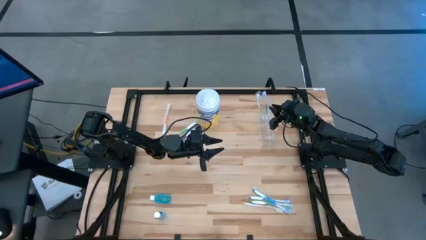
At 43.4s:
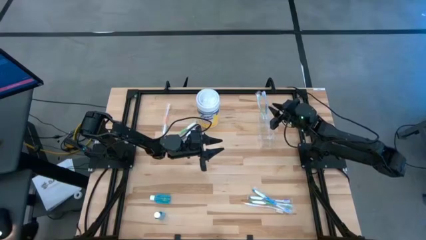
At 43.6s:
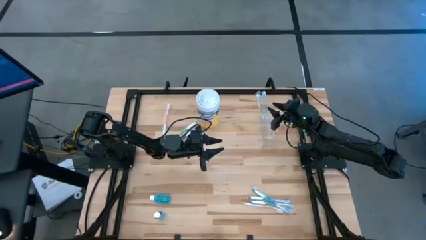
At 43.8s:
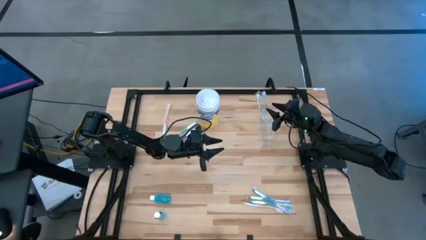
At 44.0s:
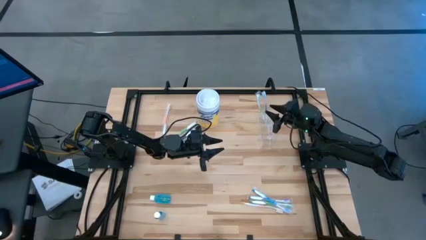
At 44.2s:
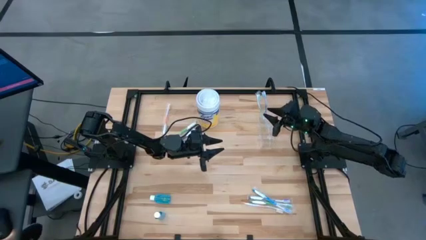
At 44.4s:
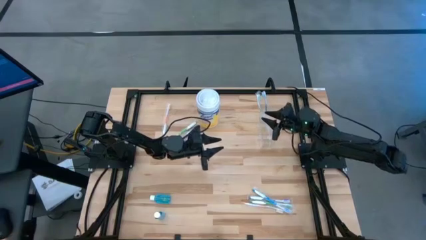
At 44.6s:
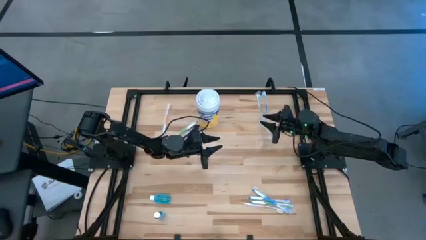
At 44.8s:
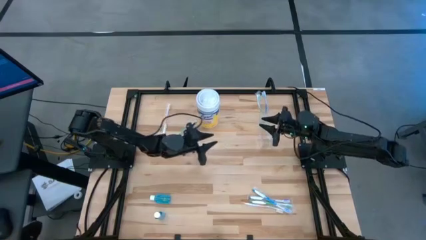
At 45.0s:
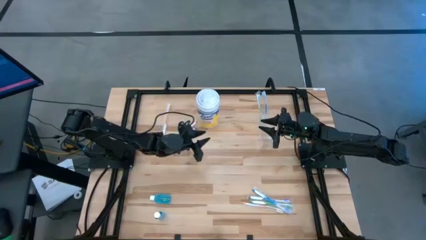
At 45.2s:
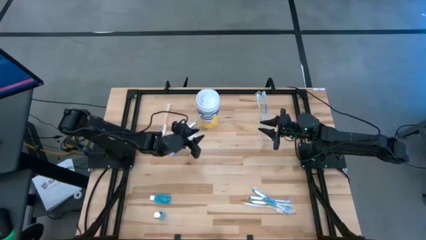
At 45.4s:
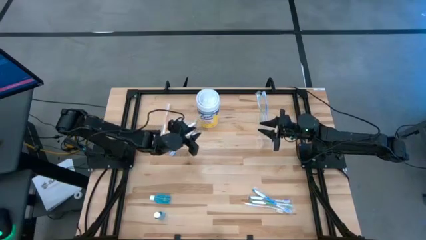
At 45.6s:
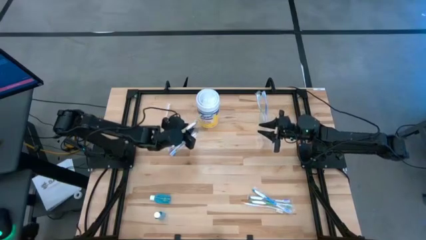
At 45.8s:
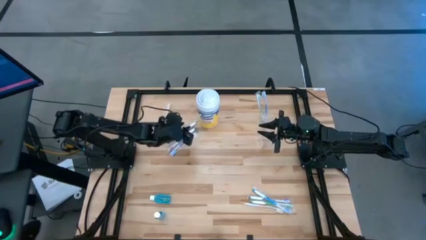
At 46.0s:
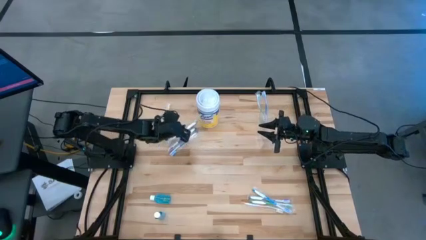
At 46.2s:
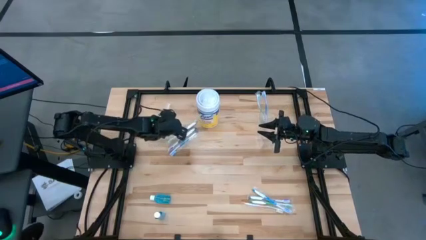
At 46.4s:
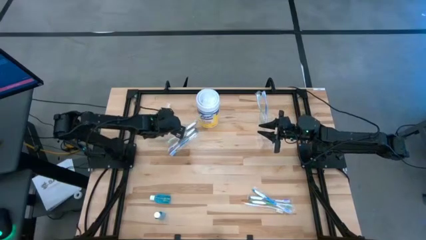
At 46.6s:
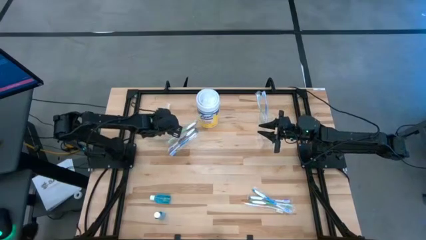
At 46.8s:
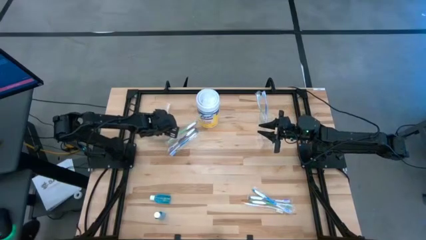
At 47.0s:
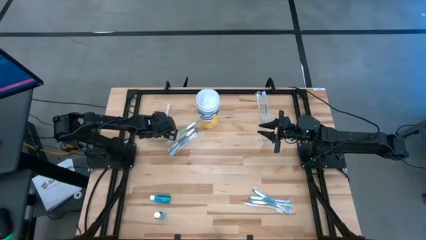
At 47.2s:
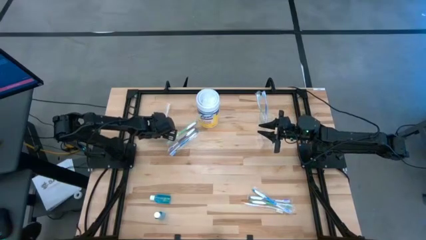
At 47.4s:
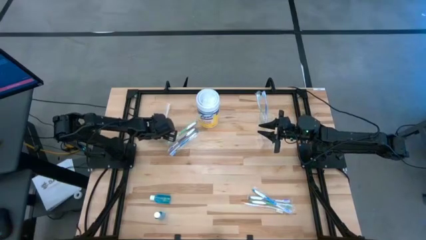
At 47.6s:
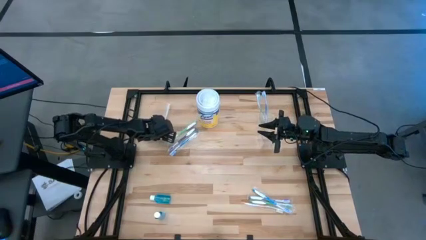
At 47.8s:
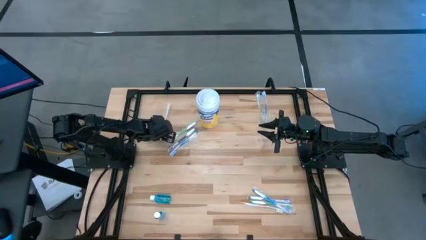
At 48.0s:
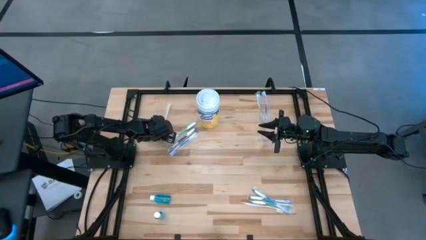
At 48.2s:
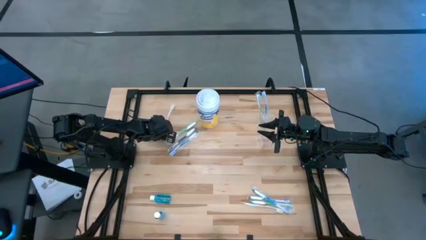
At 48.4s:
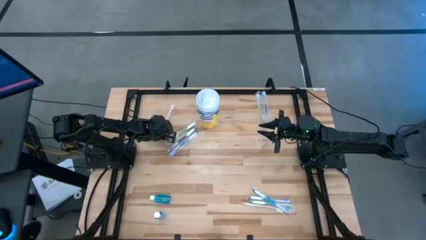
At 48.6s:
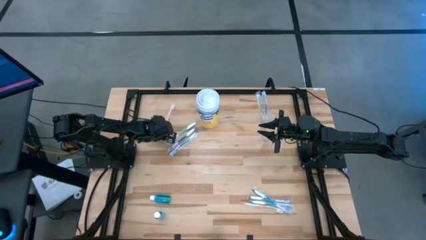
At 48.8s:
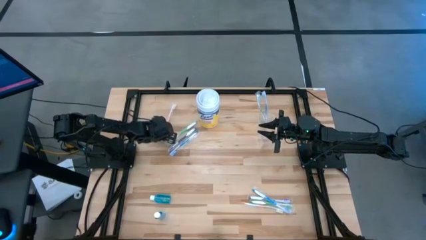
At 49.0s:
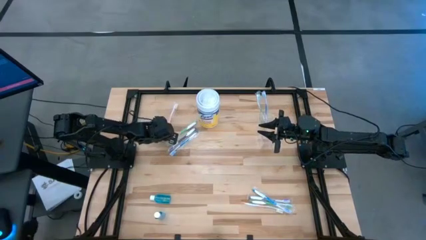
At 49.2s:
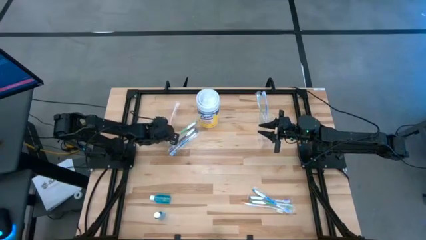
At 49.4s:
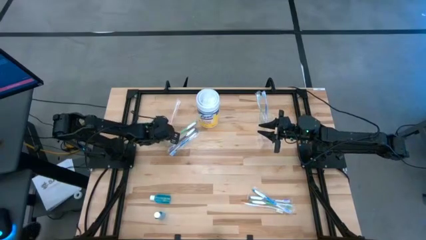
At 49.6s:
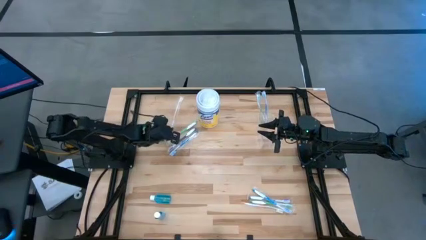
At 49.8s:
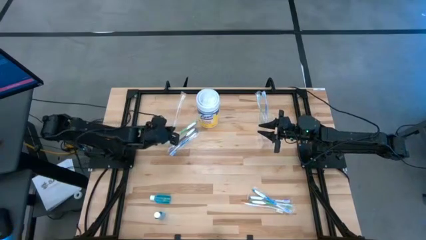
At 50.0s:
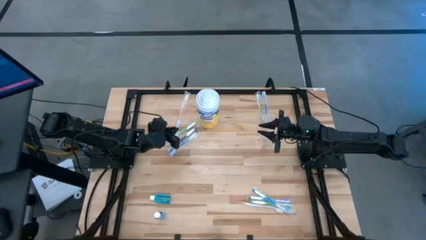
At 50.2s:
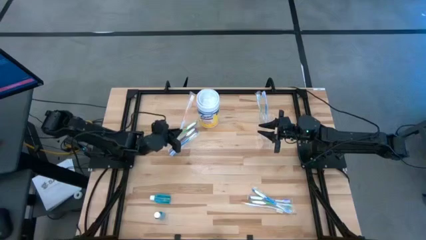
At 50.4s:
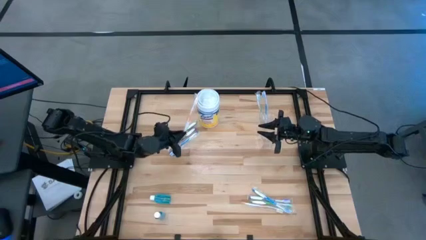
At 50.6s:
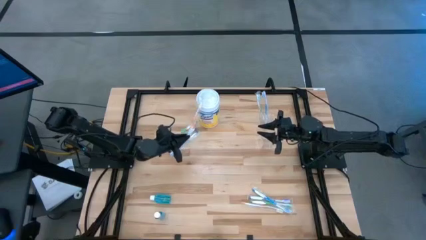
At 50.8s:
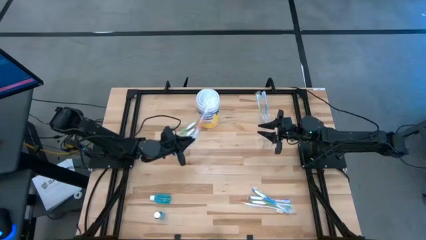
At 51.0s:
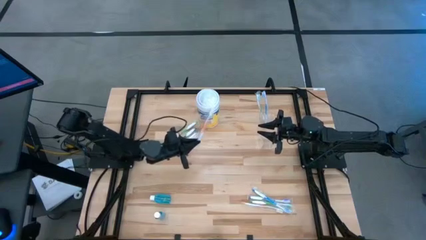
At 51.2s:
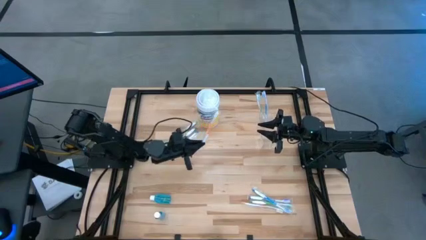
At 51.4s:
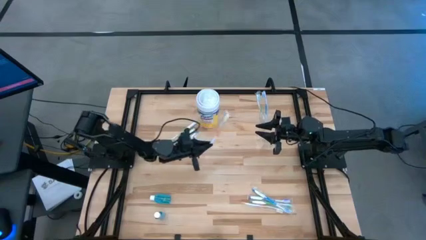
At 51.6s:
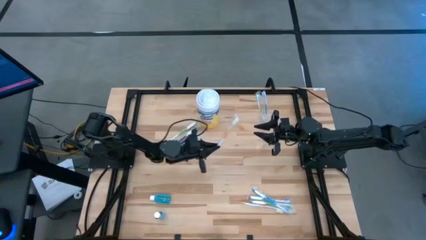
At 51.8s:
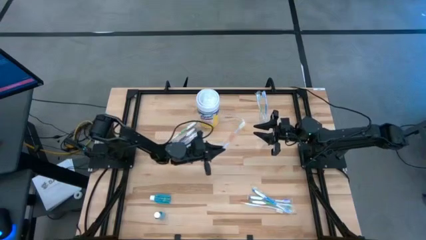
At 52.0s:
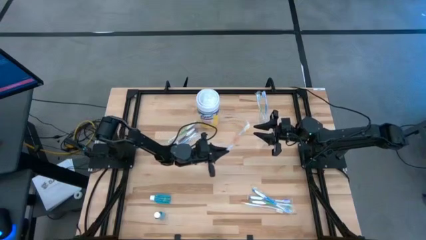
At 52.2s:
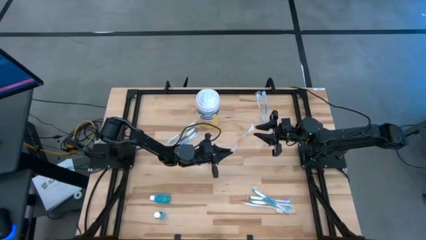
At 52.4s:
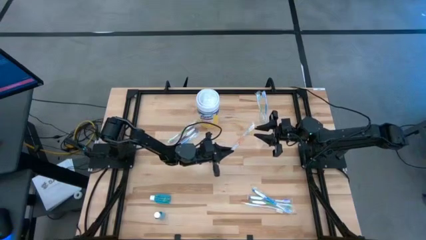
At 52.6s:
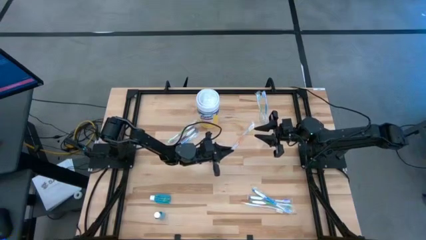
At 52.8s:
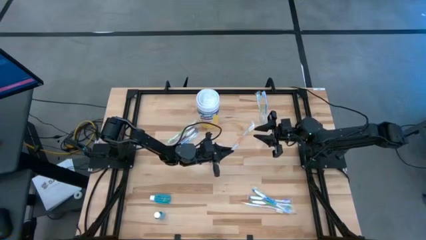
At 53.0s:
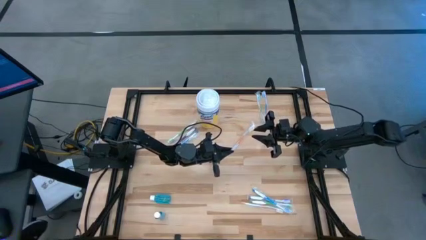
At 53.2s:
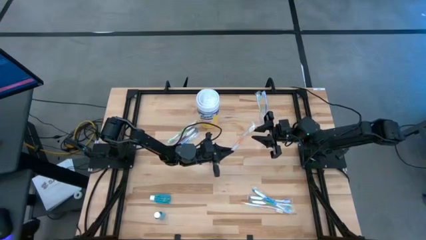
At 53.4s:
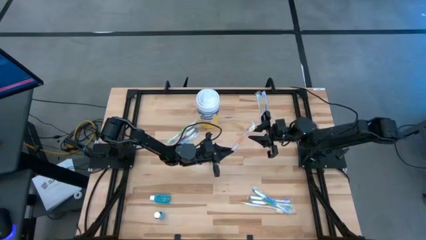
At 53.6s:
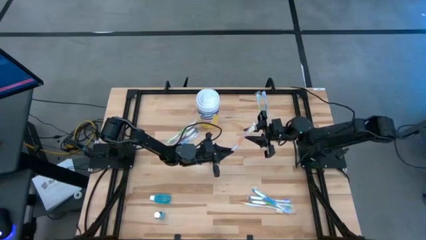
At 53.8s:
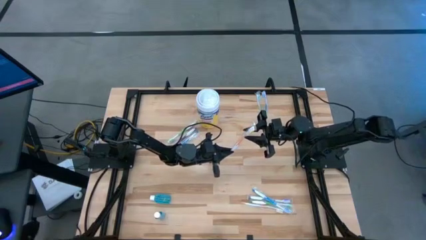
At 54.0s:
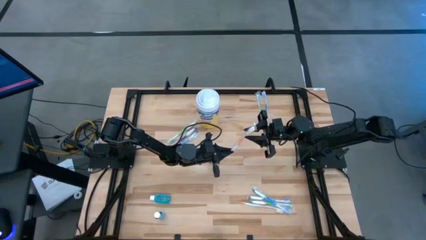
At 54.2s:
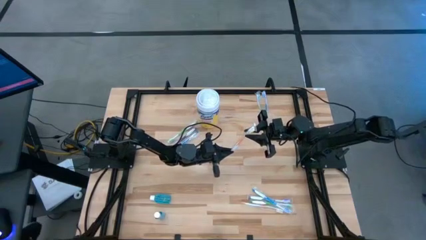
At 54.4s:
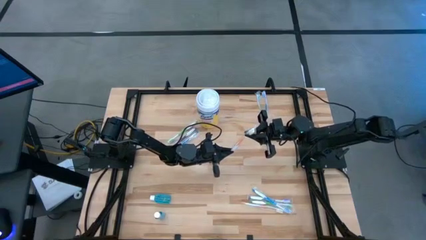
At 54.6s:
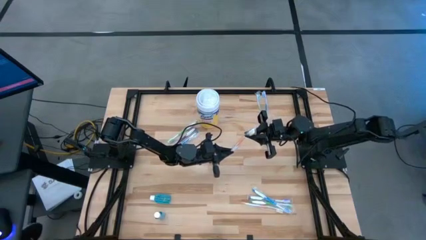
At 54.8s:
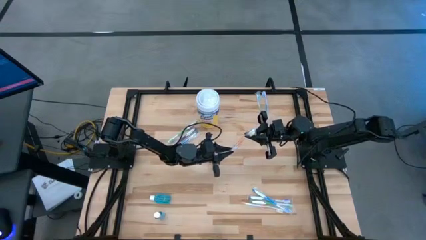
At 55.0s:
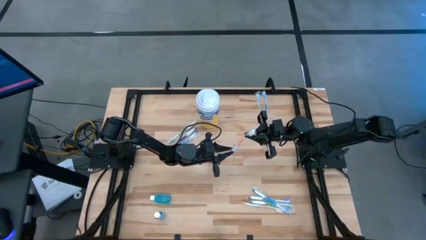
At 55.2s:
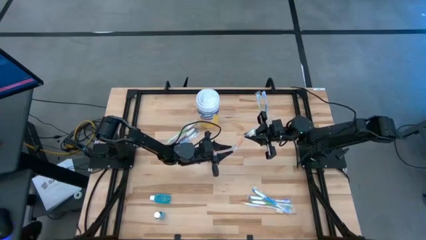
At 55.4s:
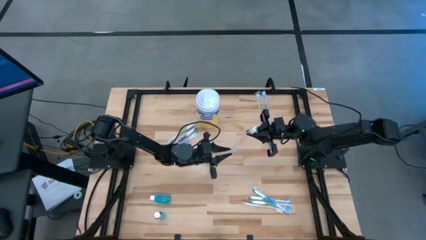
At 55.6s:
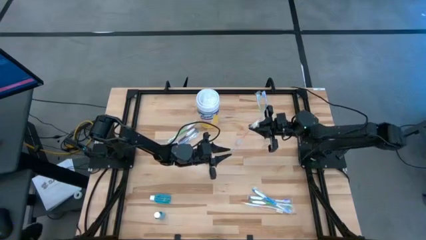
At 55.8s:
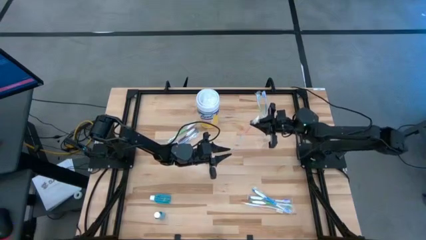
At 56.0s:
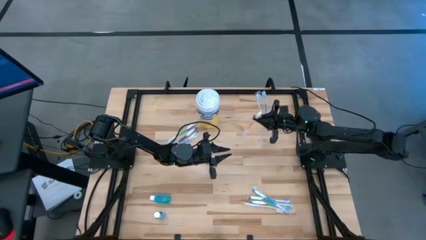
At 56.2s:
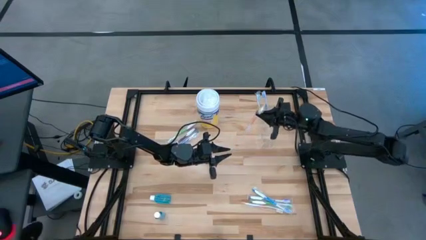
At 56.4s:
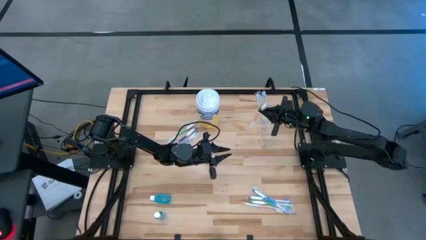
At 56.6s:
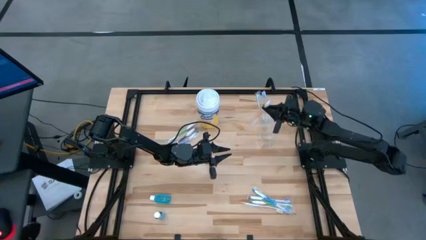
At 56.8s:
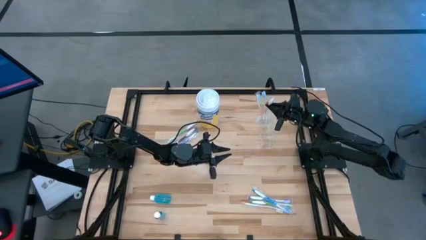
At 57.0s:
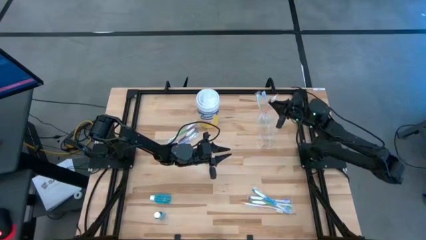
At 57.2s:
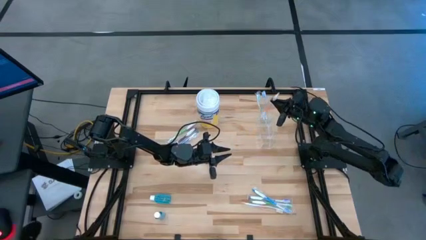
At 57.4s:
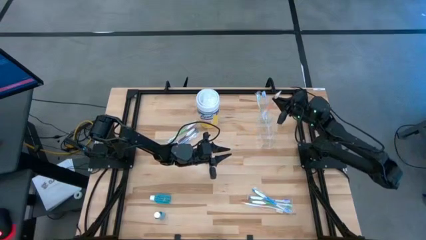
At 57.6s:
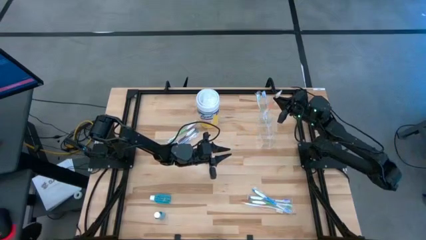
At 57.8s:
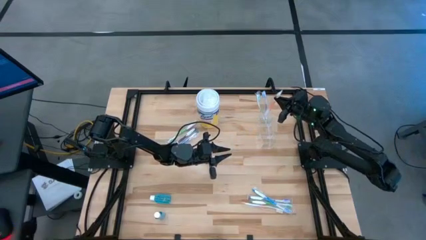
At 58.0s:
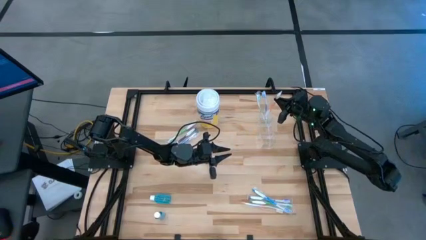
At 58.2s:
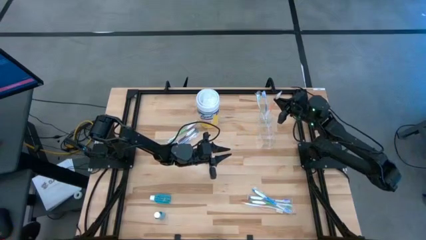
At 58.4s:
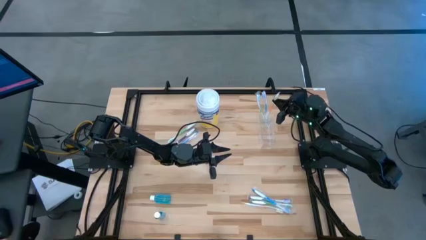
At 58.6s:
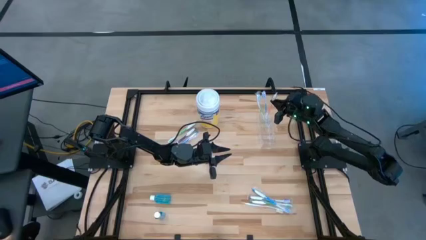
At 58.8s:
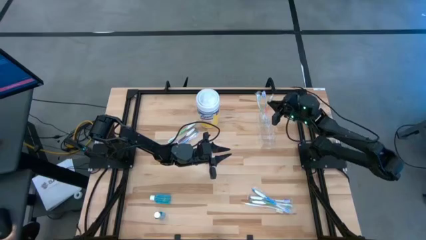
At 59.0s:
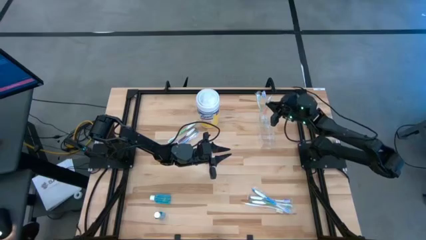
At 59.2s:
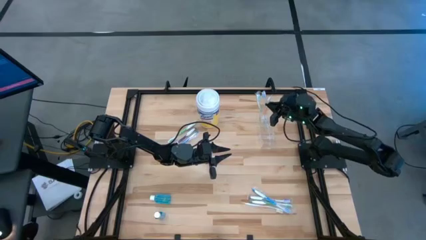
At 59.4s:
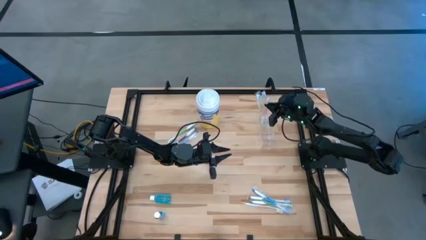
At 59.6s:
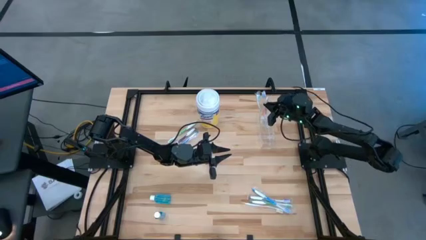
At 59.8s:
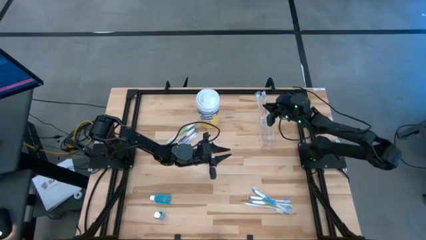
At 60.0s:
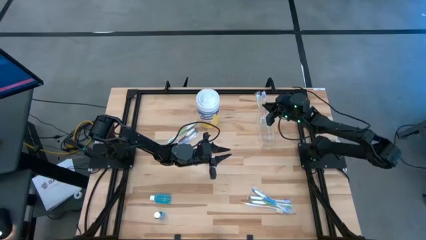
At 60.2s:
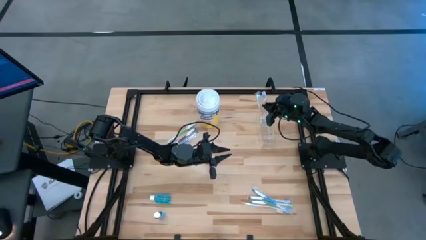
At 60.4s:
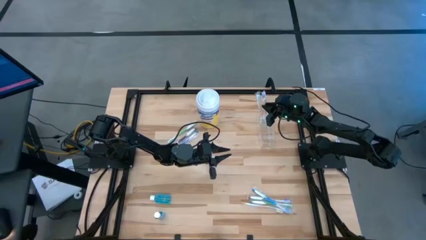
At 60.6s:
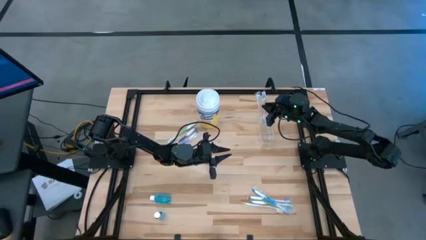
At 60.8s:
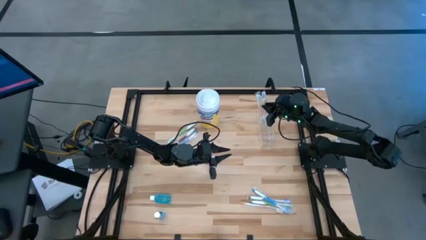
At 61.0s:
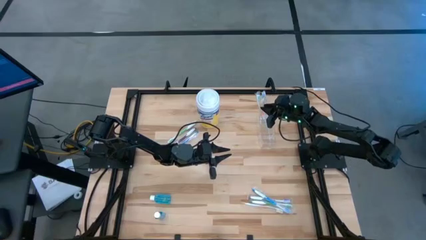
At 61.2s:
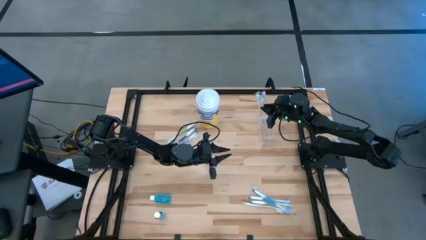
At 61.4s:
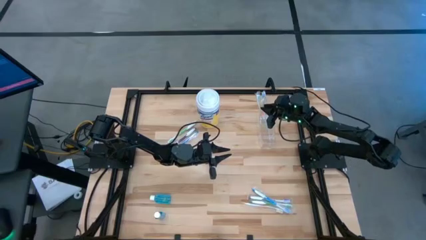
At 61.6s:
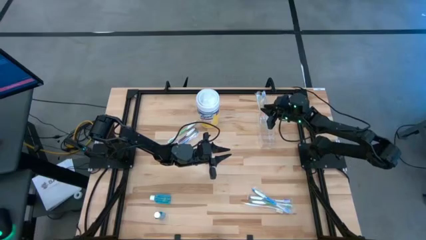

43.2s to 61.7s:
Task: Pick & Place toothbrushing station
Put the top orange toothbrush into the transparent organizer
